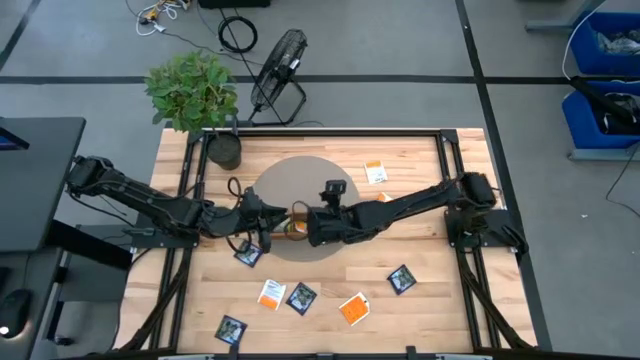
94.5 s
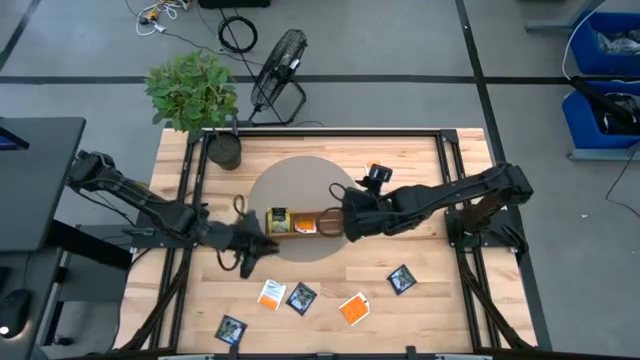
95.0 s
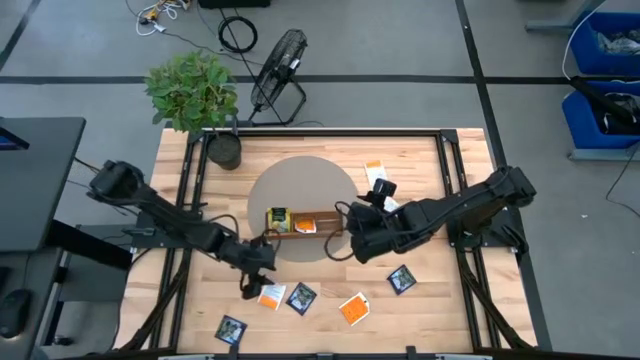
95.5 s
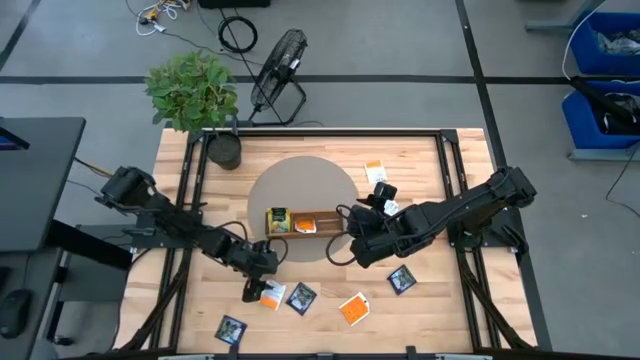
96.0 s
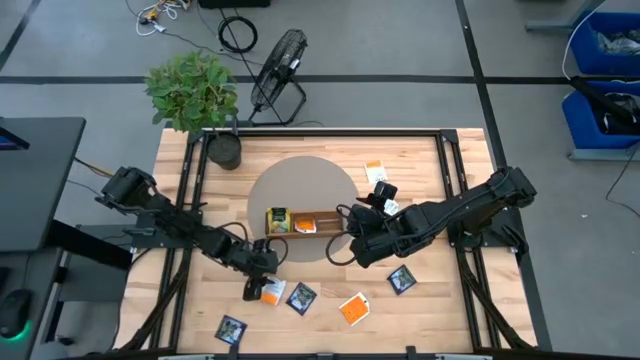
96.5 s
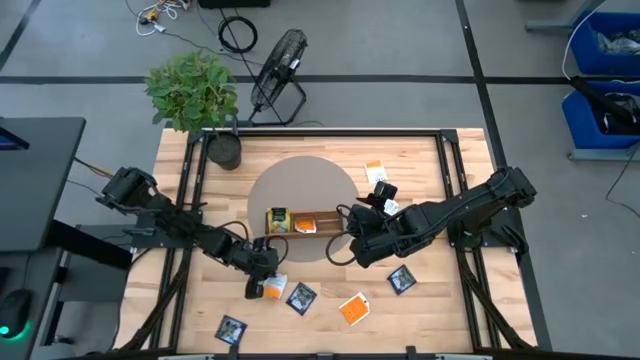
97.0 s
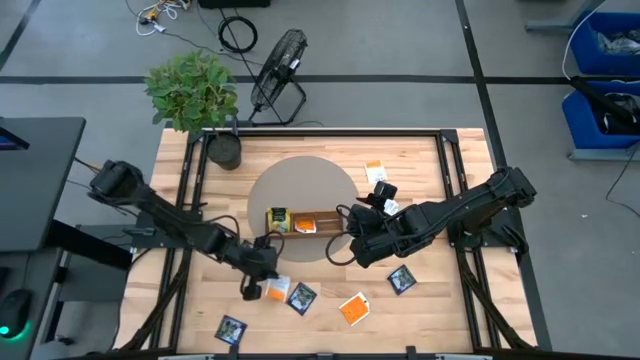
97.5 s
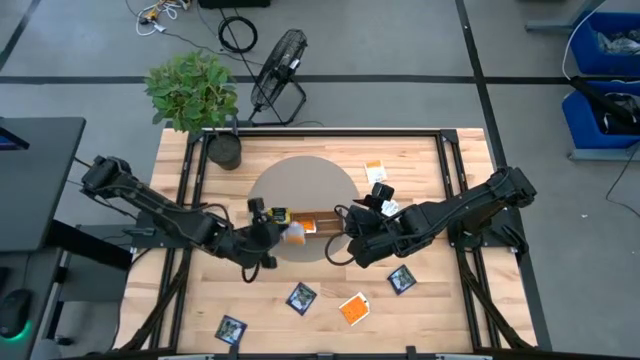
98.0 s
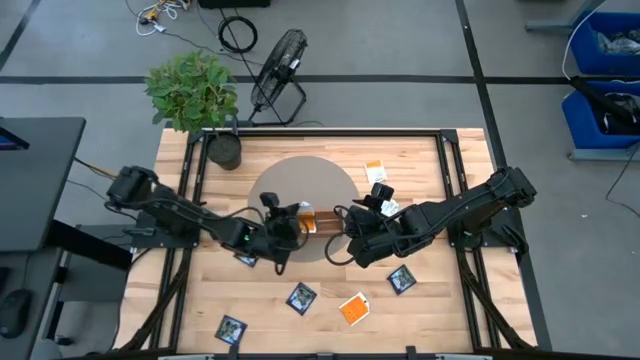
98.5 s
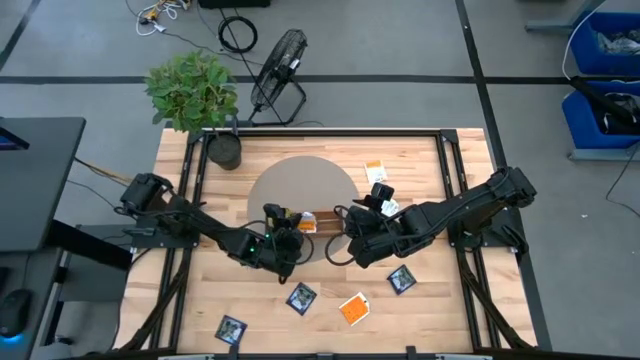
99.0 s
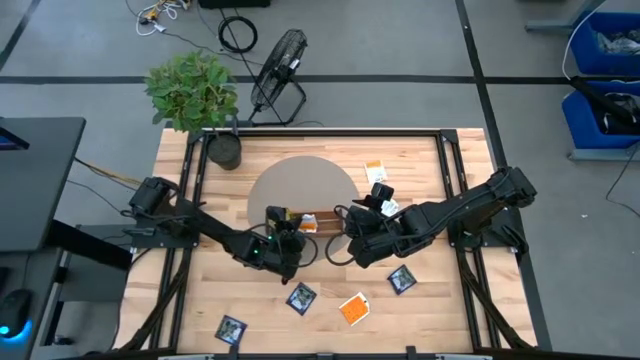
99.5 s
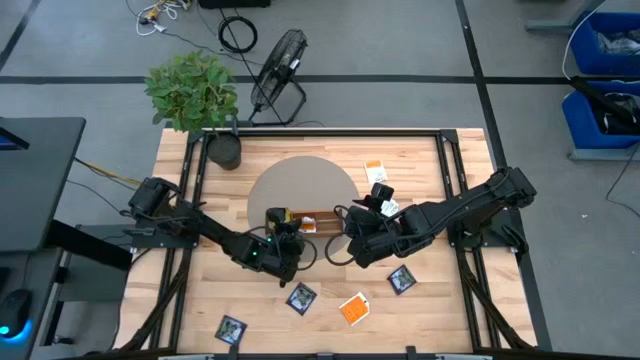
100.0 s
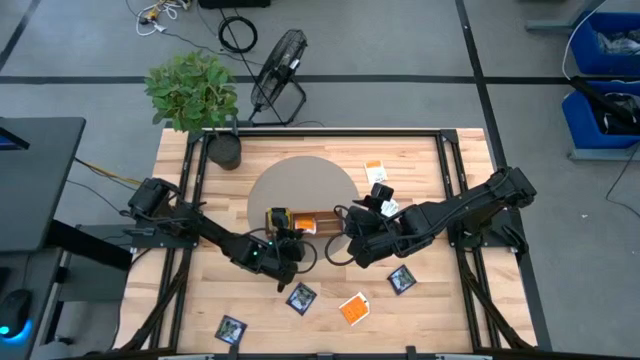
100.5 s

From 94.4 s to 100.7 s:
Task: Pick & Place Tea
Put the orange tea bag into the wooden organizer

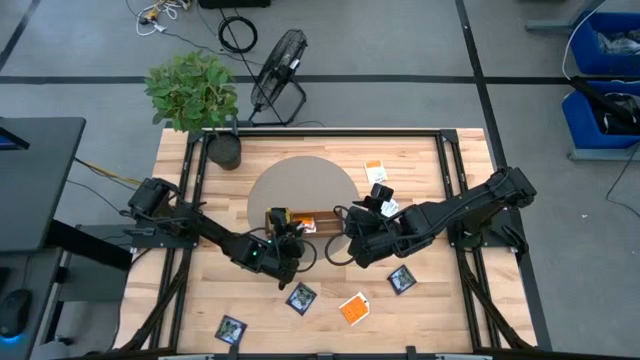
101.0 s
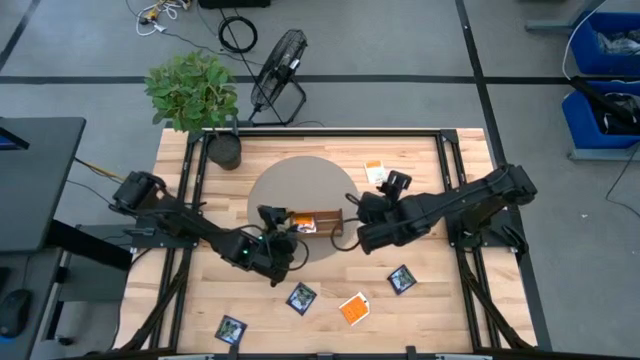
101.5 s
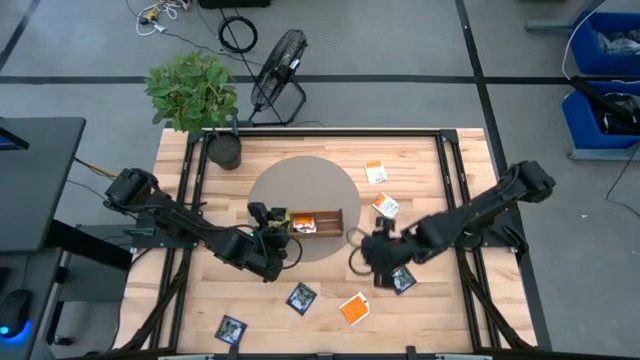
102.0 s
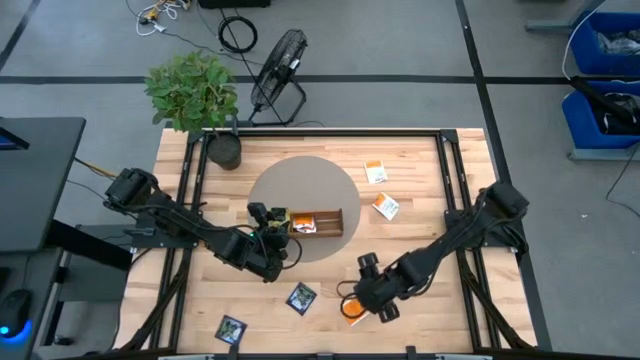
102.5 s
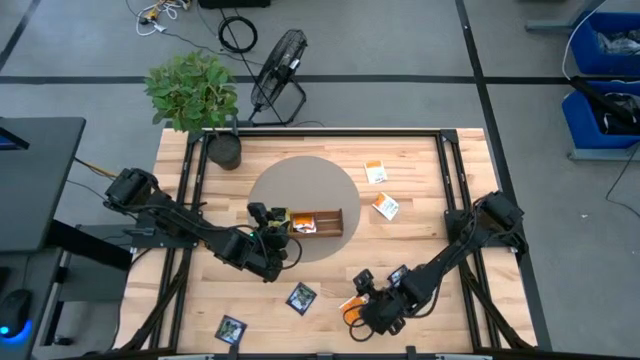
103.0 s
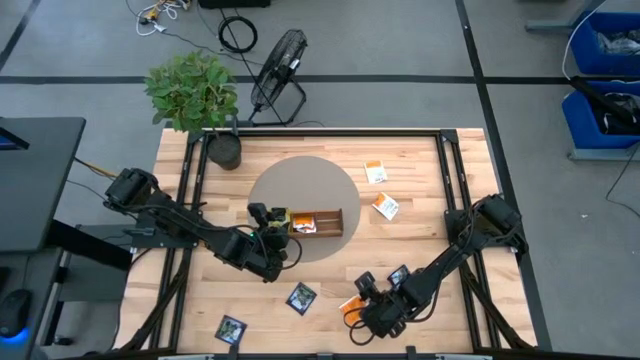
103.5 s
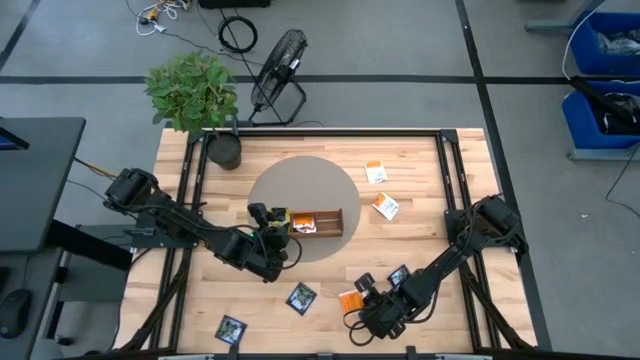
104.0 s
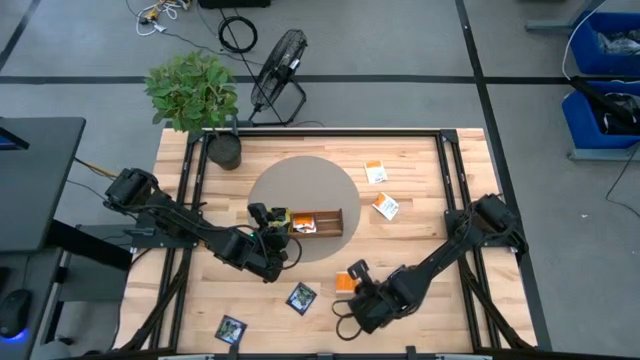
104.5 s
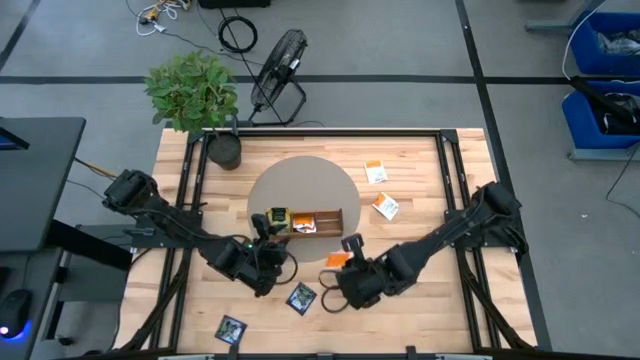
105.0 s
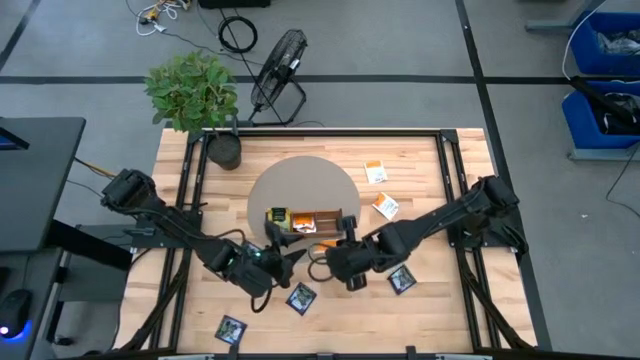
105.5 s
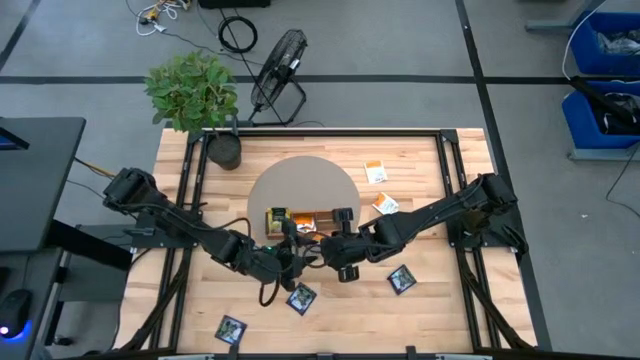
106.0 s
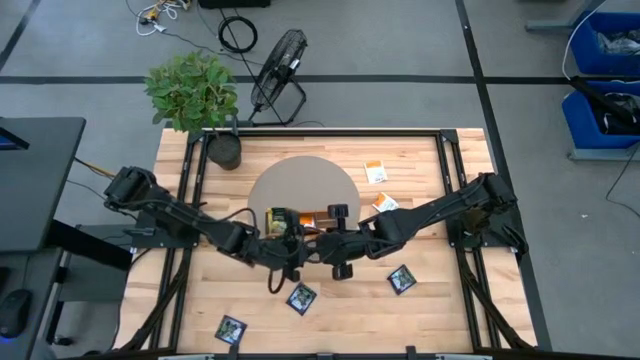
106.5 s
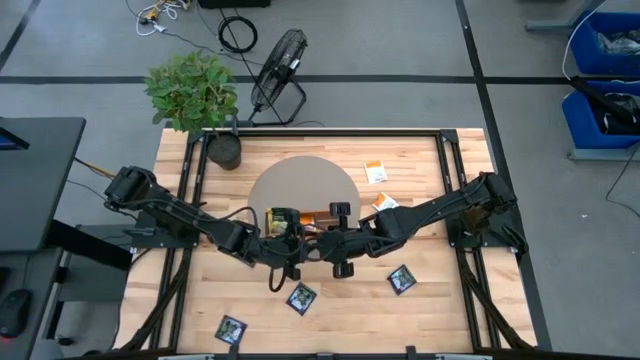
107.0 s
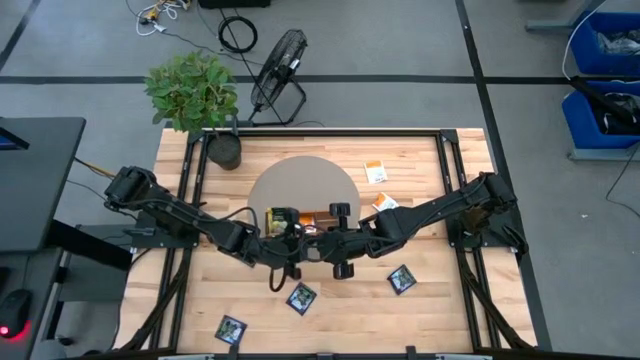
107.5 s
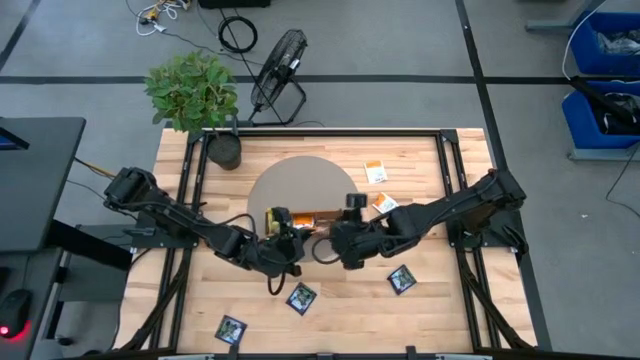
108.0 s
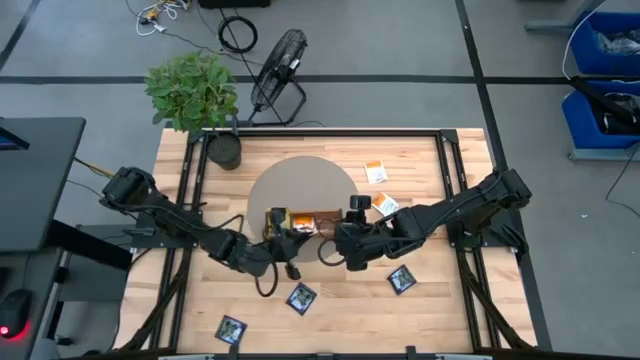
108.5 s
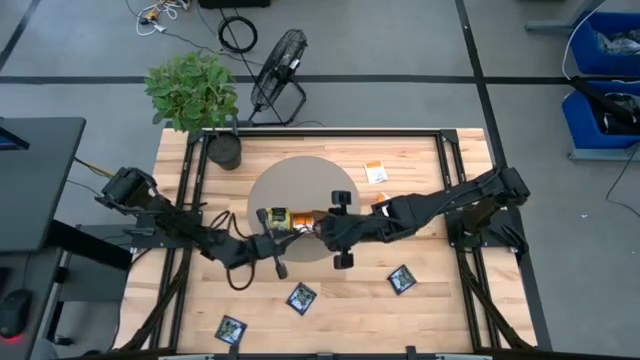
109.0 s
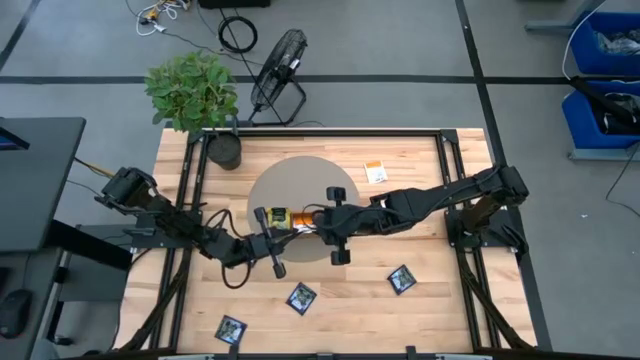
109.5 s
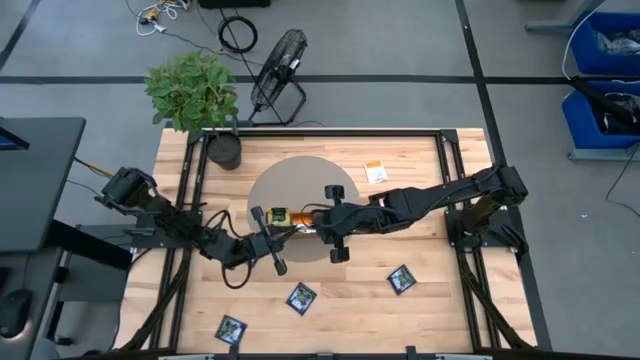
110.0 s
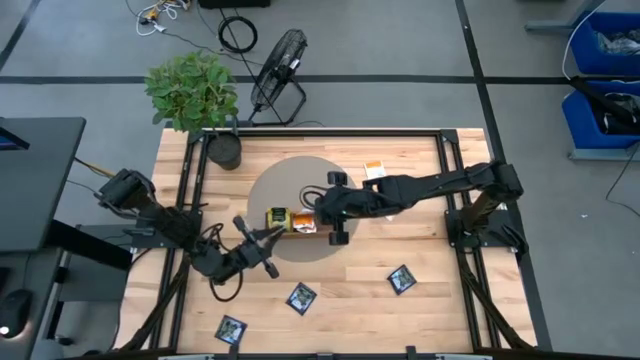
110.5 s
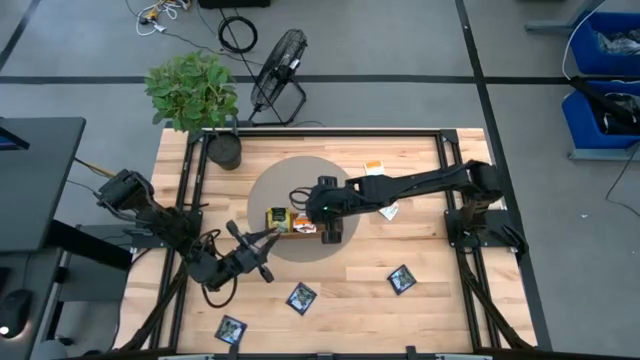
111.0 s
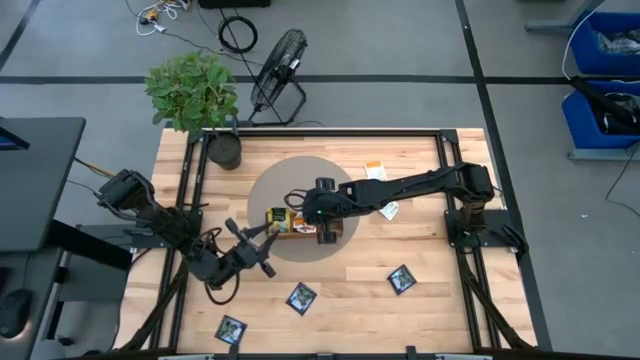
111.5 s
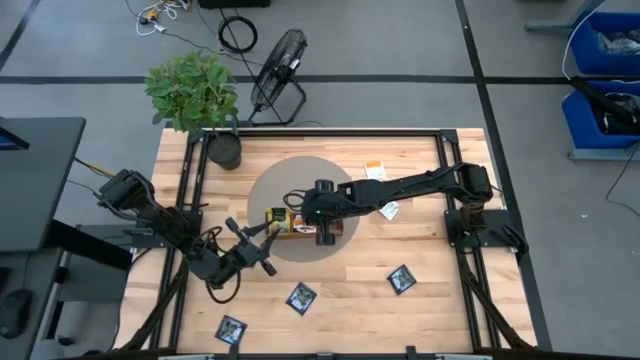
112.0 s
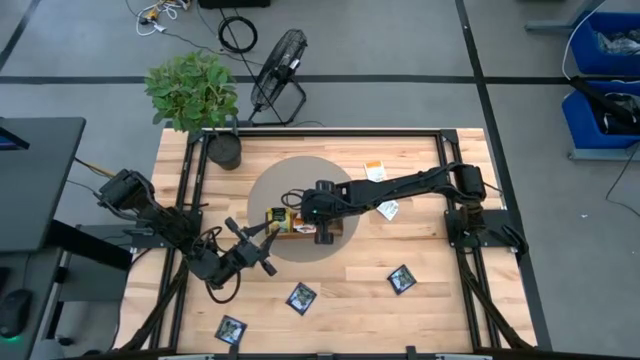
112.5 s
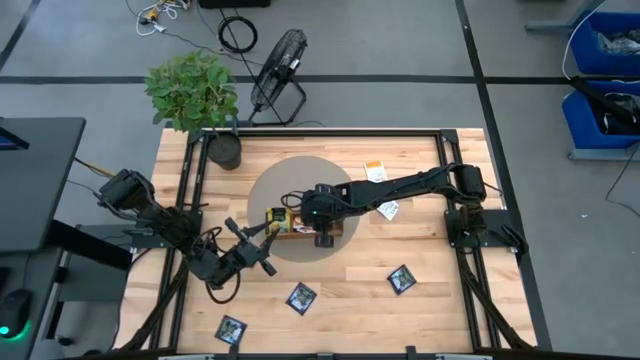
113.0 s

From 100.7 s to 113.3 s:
Put the bottom orange tea bag into the wooden organizer

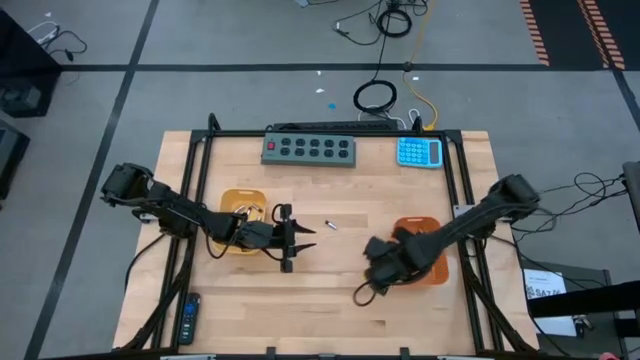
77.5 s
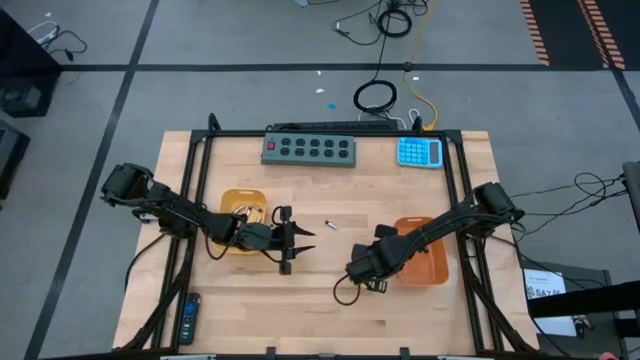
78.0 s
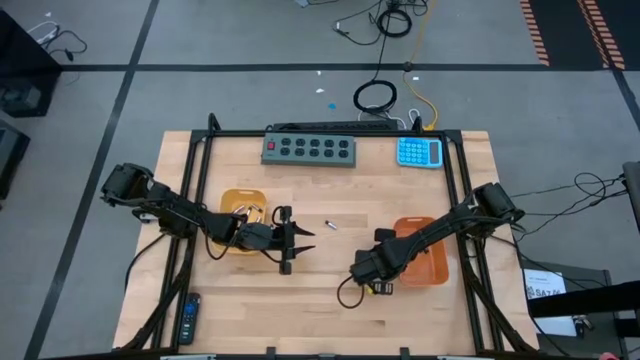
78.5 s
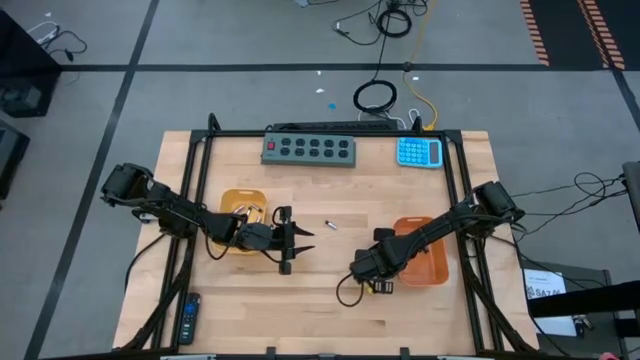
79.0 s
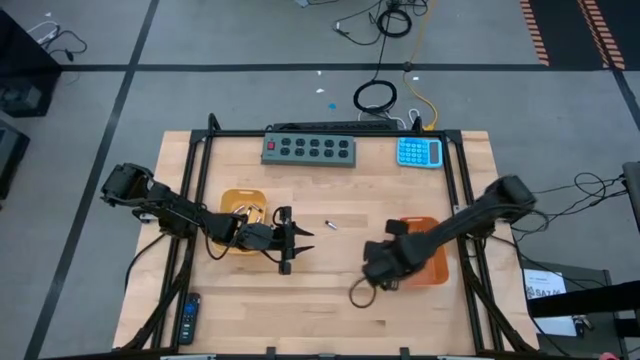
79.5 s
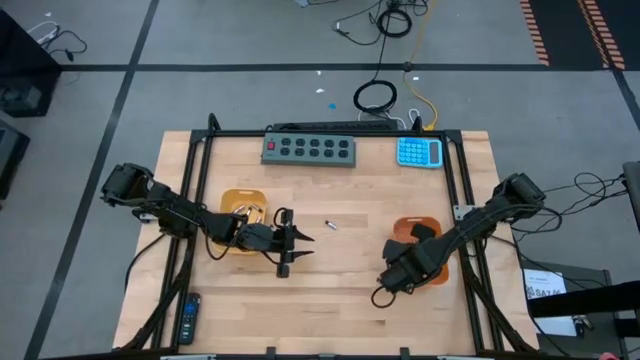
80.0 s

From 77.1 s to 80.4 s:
Task: Sort batteries
Put the black battery into the orange bin
